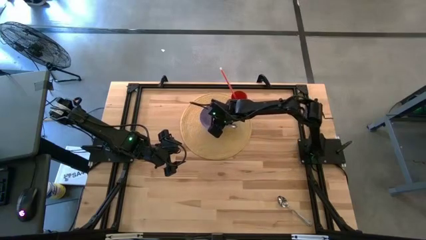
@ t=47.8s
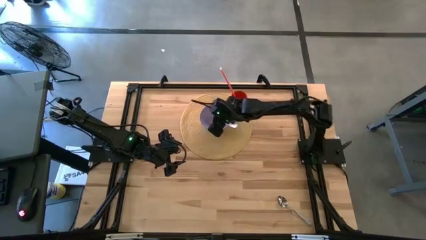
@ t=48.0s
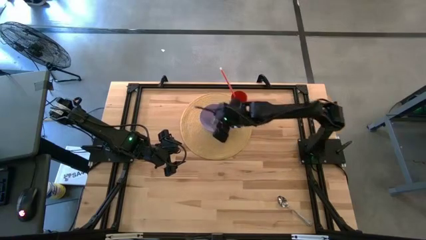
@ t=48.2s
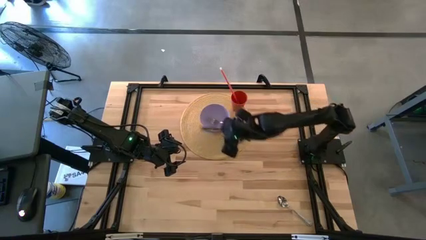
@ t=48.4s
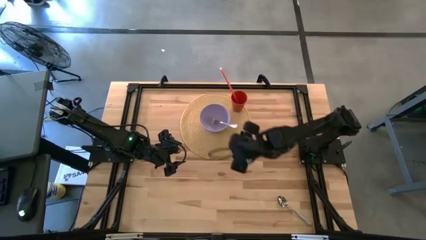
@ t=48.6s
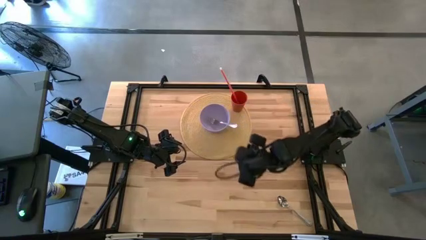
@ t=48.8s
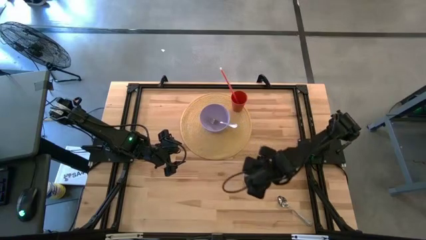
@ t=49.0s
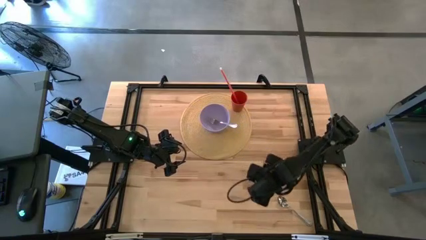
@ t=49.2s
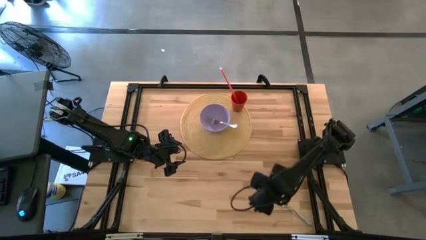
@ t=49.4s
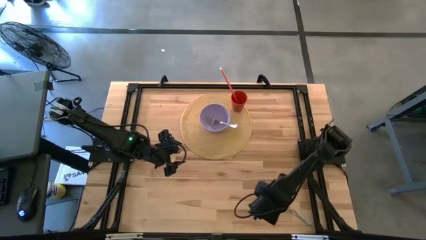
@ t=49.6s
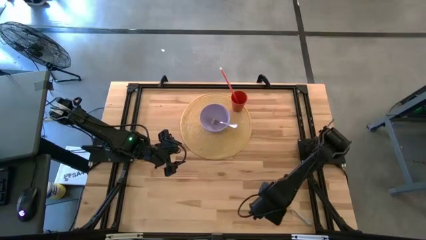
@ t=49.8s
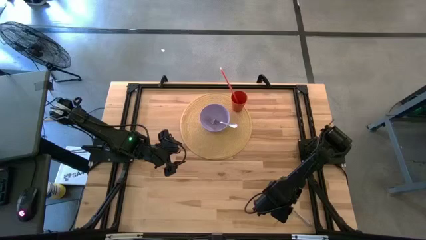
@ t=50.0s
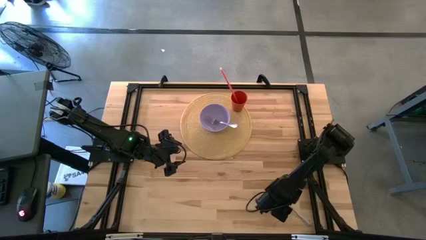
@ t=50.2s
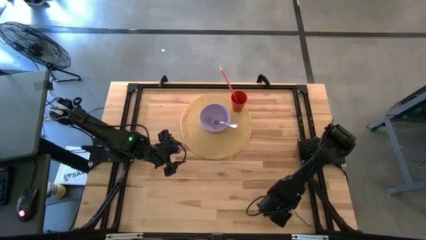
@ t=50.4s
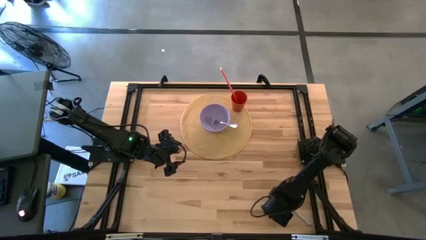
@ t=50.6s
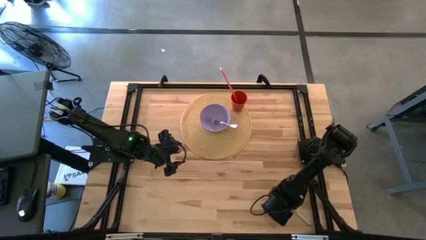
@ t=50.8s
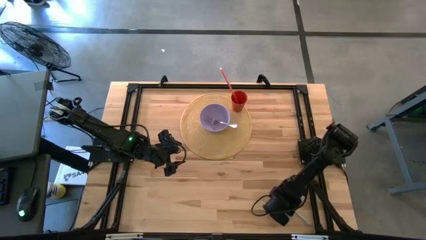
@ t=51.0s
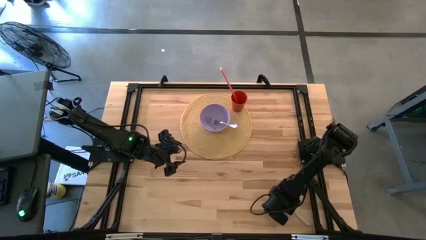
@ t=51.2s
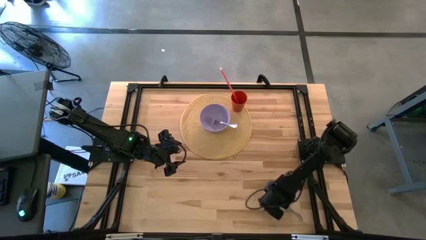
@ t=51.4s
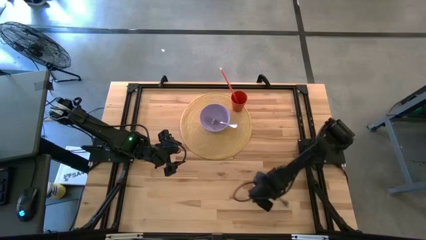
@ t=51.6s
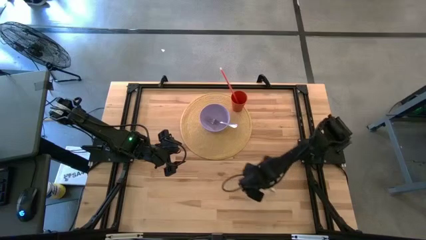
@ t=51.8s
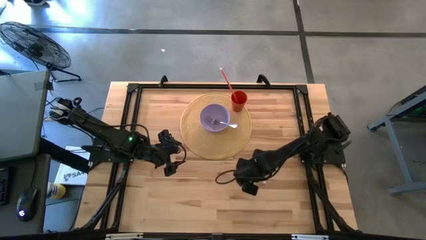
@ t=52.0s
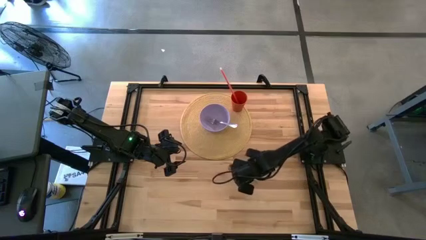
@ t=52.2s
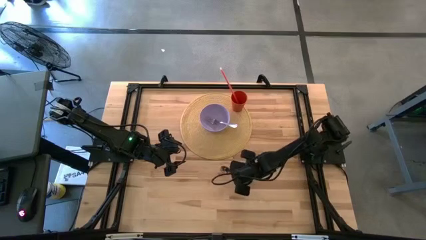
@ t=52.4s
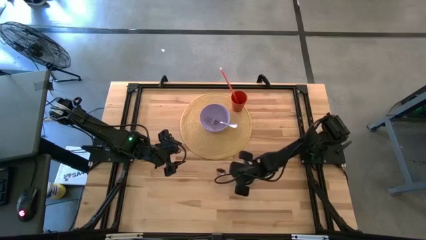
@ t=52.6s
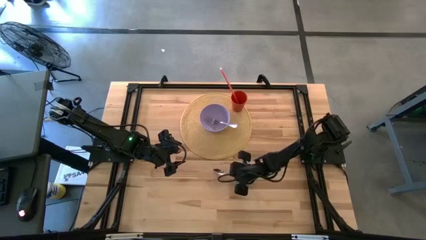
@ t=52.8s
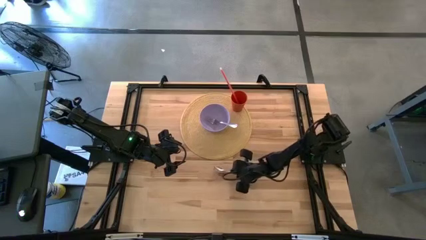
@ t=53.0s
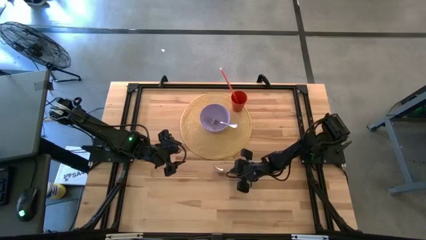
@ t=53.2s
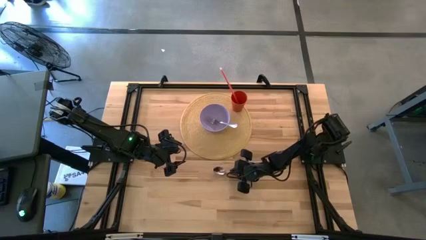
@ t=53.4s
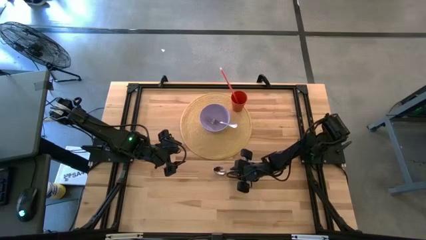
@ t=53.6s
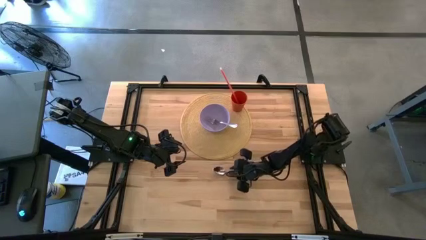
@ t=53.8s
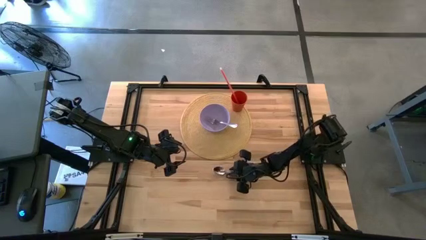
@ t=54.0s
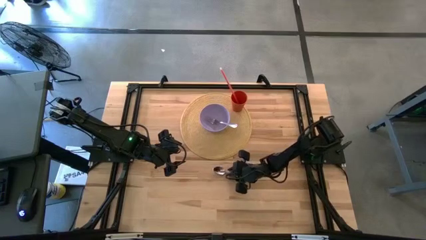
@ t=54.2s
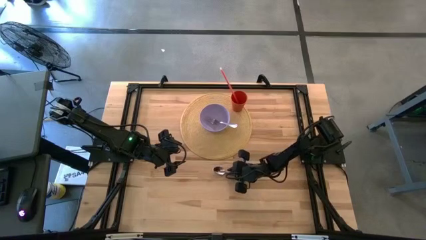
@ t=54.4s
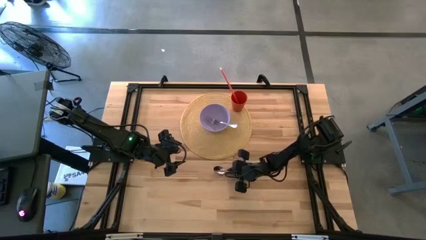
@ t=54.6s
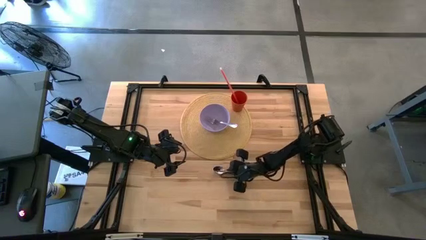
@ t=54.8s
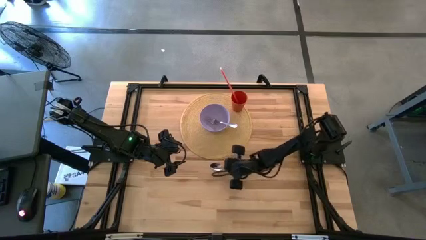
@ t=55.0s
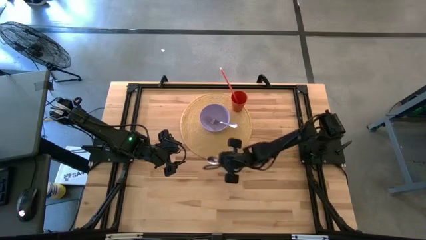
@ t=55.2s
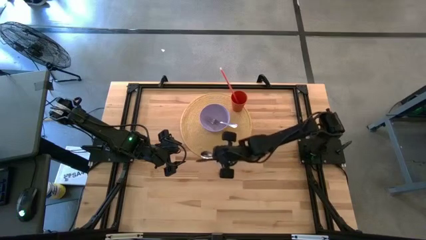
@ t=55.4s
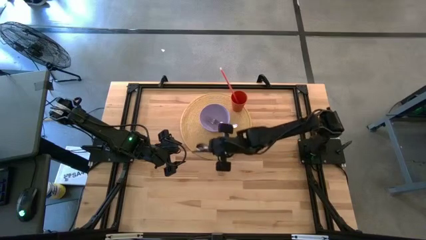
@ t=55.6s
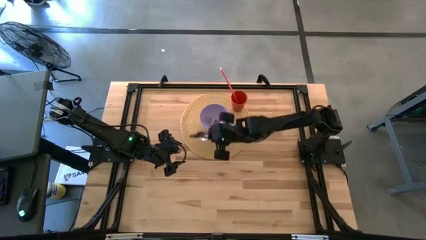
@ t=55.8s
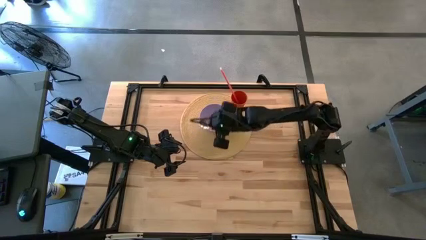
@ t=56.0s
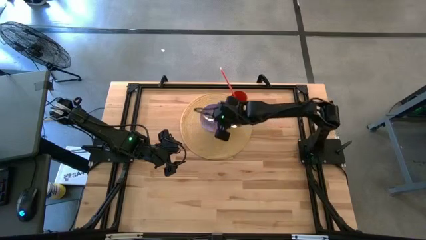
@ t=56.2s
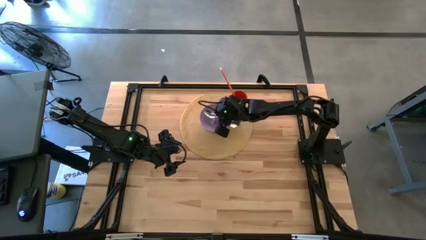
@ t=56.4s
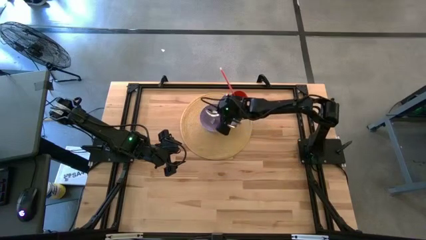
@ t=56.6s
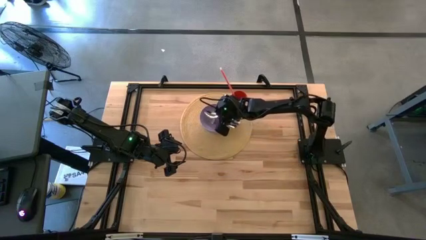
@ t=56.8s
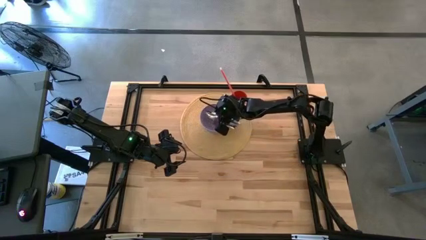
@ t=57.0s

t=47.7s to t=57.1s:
Task: Pick & Place Utensil
Put the silver spoon into the violet bowl on the table placemat

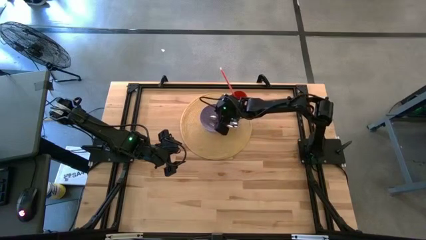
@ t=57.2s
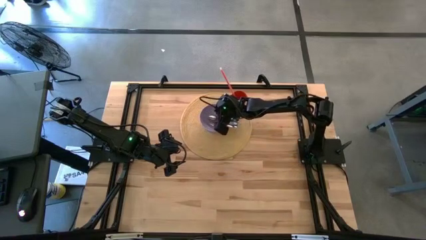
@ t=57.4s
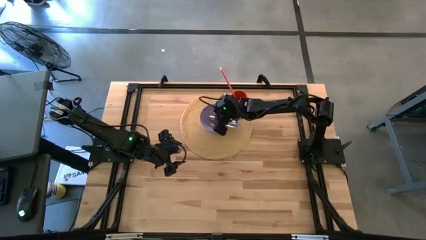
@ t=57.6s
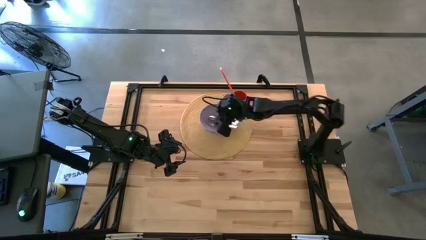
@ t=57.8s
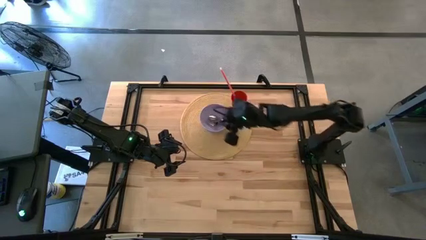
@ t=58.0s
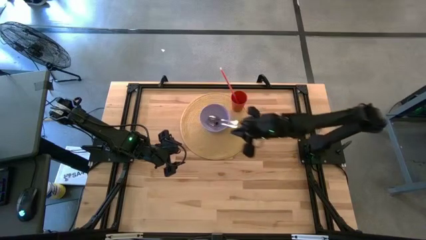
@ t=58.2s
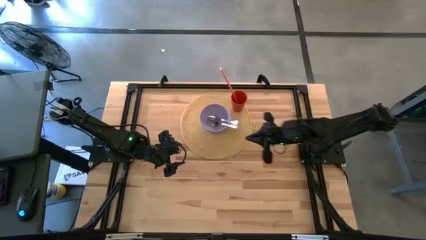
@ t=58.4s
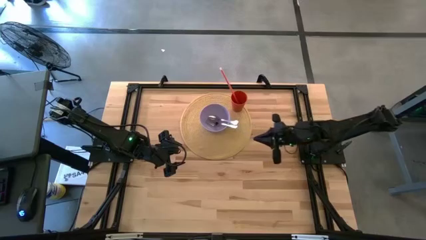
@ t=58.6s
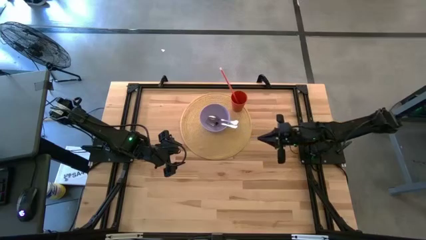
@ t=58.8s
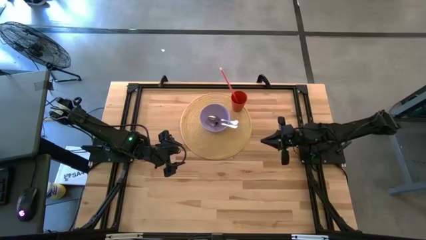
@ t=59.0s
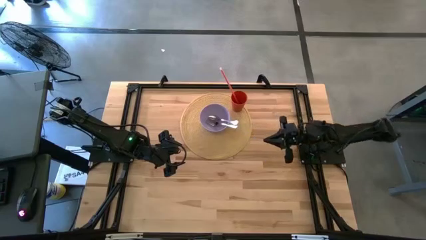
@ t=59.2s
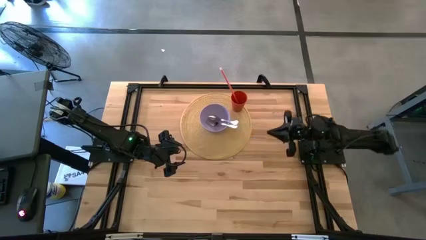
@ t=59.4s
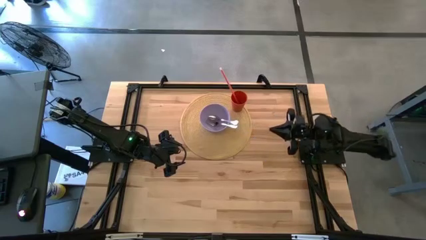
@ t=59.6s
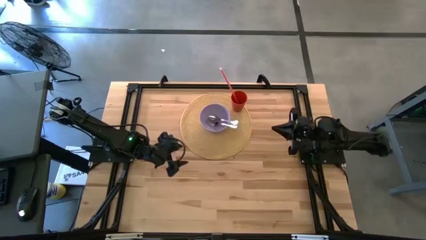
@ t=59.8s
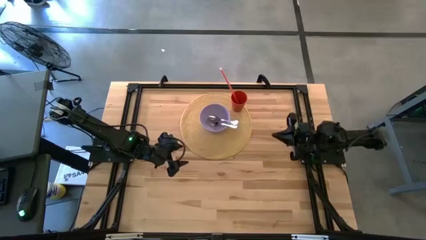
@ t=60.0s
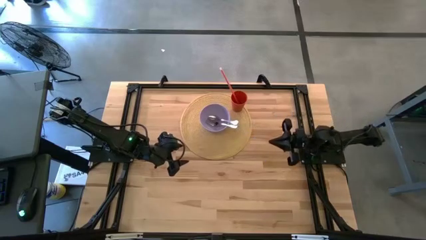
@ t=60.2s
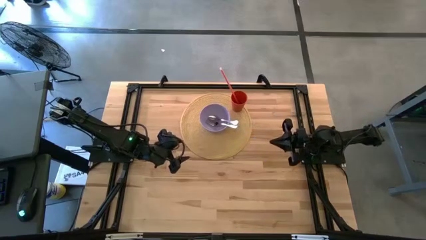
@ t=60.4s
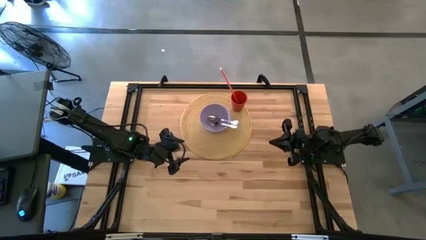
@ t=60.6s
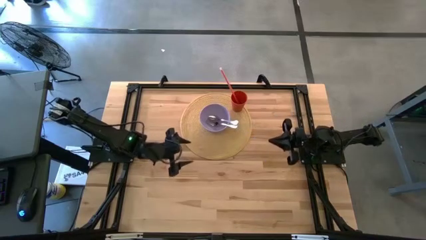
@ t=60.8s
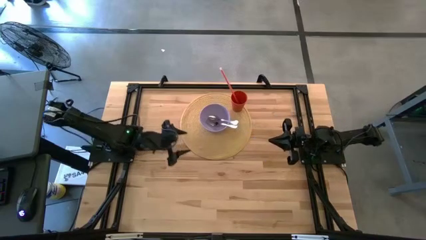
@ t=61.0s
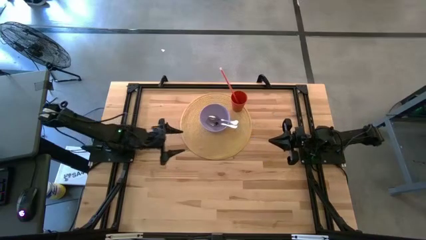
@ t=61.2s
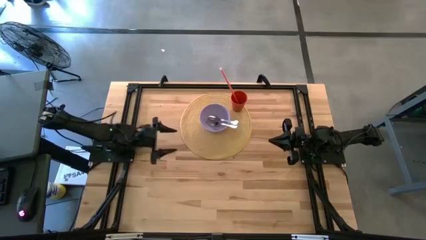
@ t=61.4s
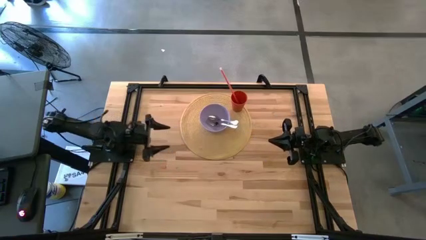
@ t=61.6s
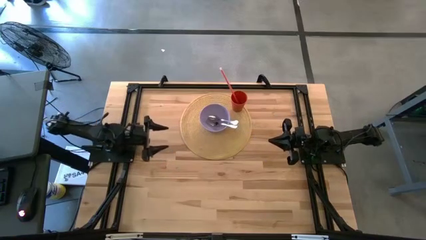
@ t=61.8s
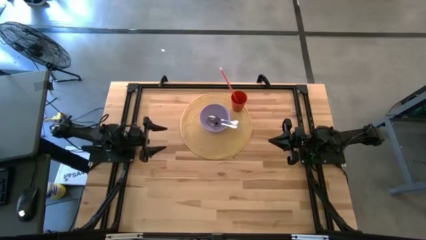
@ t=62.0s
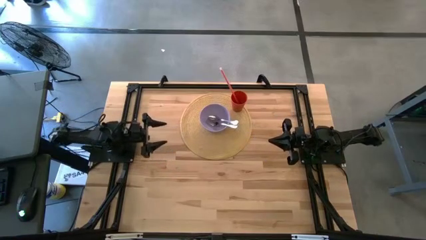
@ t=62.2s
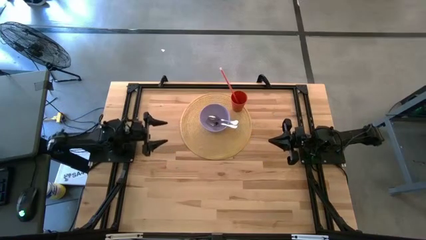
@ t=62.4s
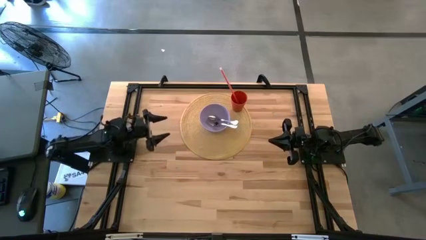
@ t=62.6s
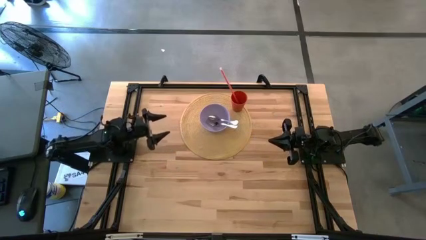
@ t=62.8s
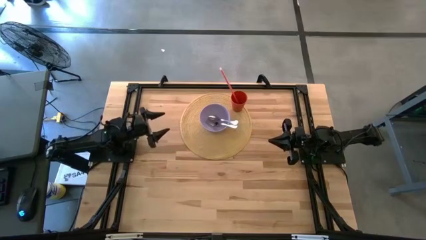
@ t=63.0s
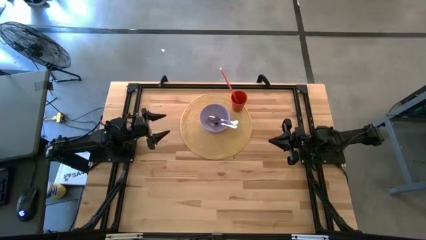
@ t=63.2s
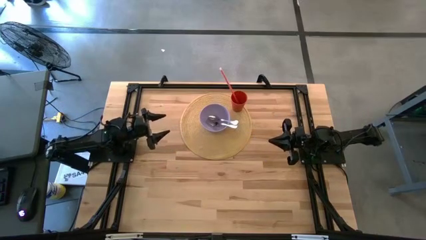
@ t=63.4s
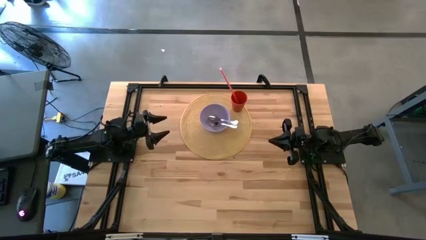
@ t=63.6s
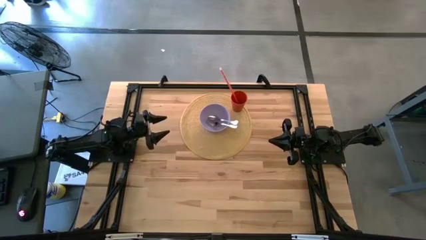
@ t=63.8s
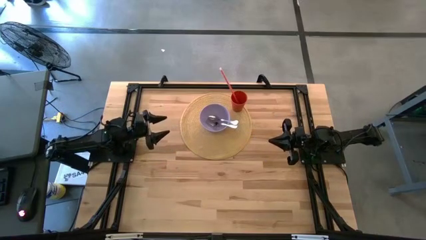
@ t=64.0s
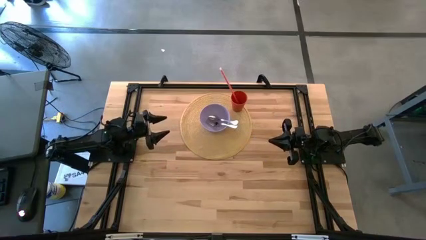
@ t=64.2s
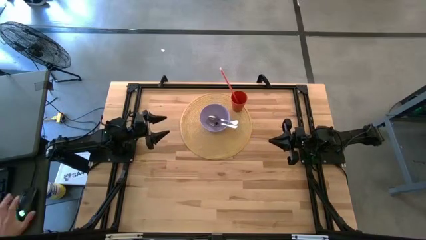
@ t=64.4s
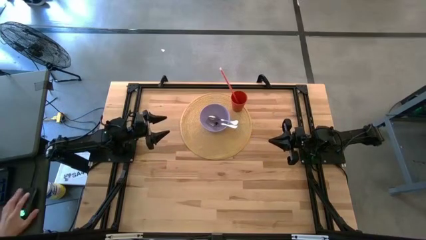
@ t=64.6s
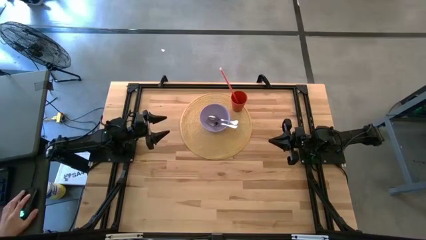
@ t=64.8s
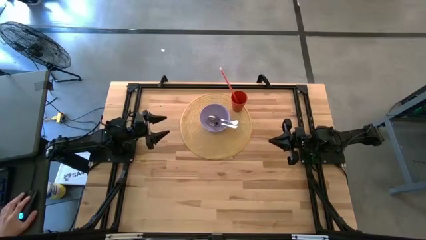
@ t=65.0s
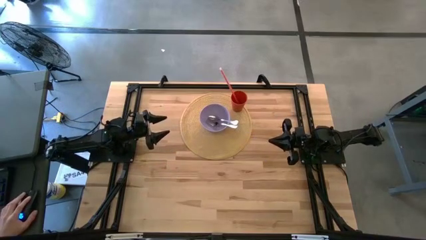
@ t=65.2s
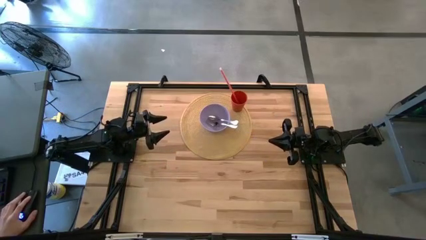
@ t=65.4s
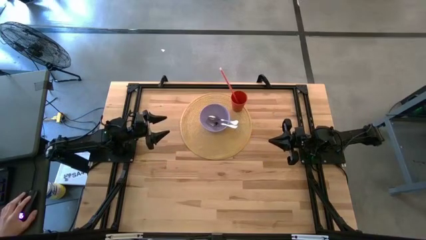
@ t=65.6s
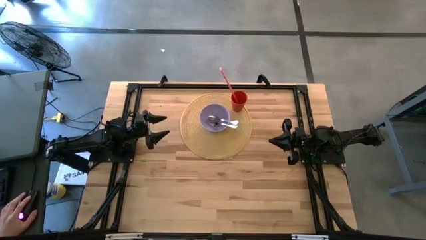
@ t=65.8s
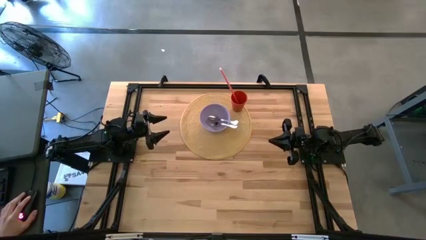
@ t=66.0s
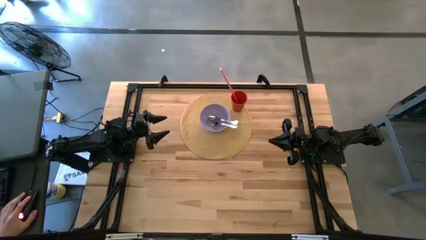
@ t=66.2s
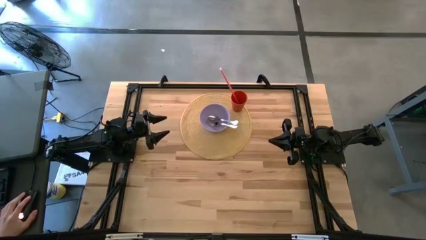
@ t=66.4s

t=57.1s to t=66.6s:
Return to Home Position
